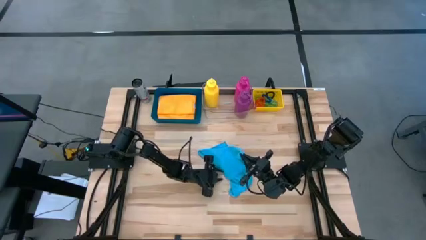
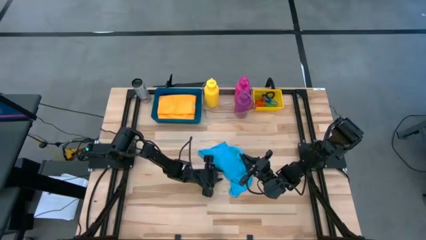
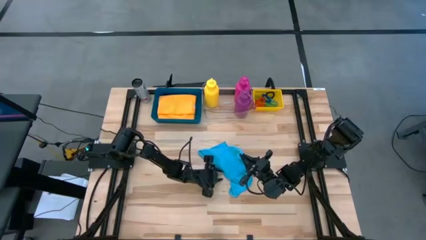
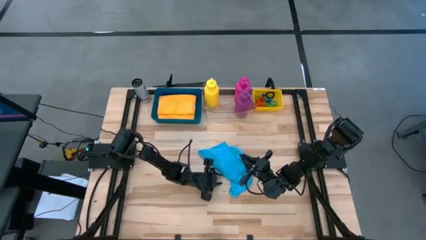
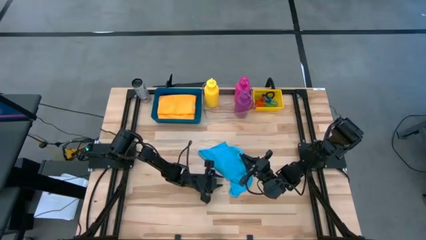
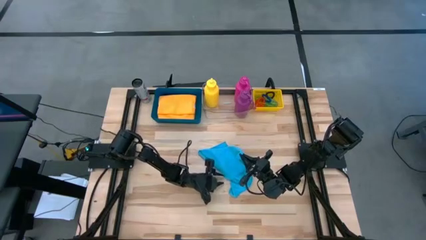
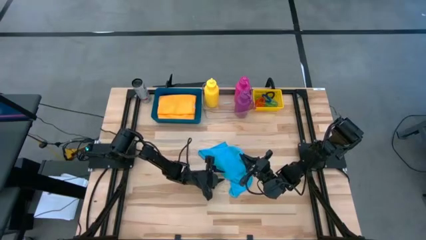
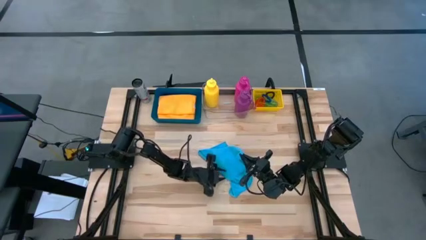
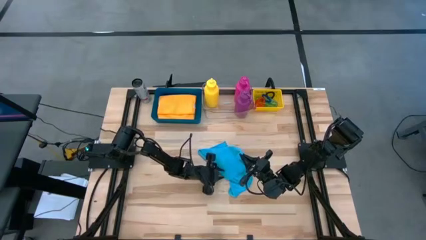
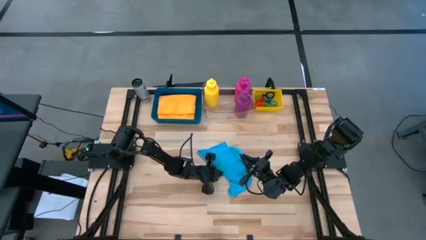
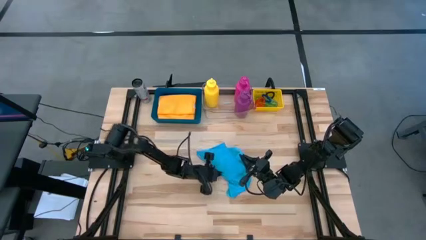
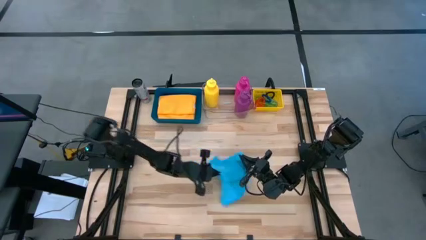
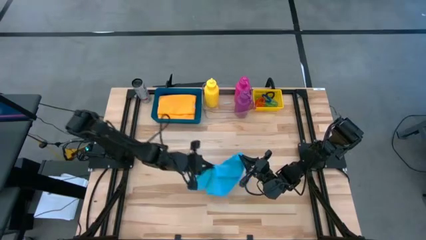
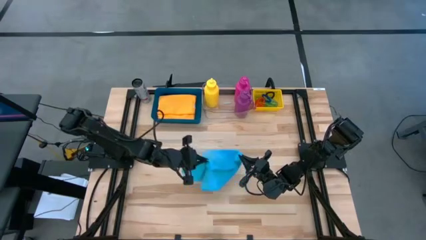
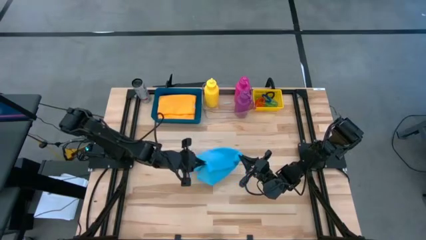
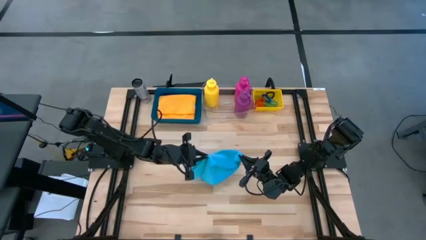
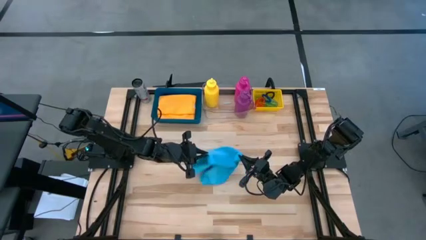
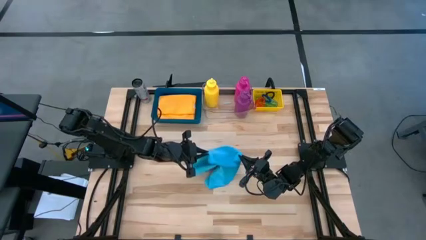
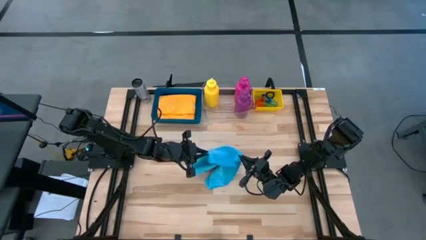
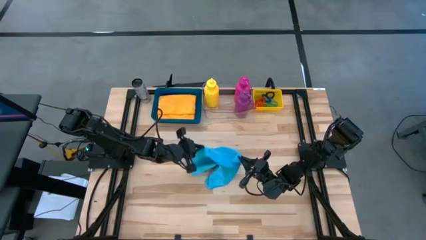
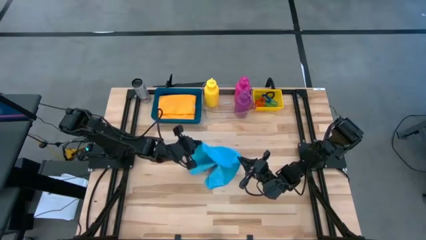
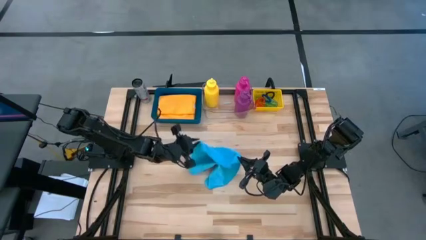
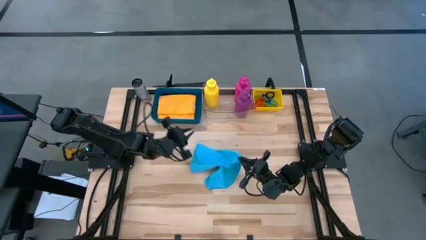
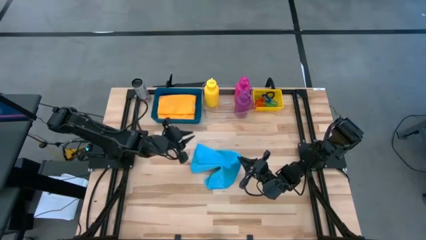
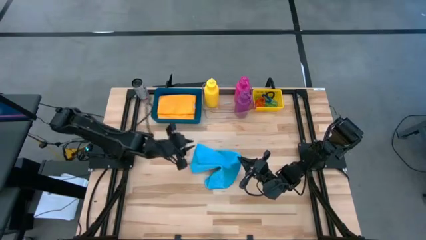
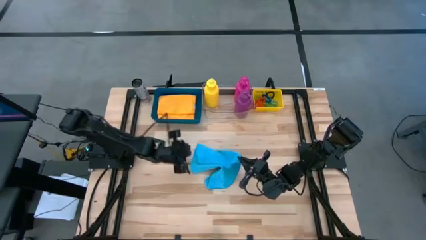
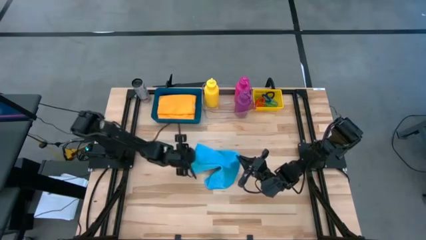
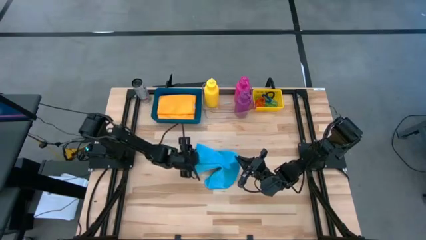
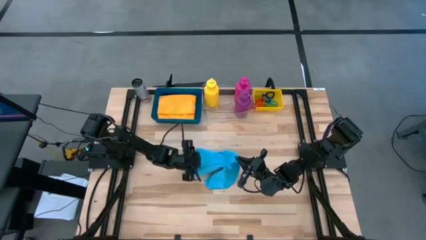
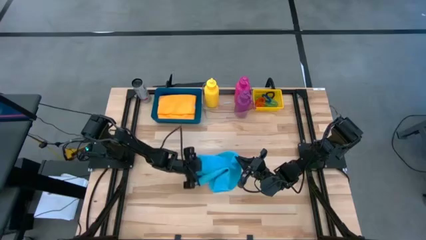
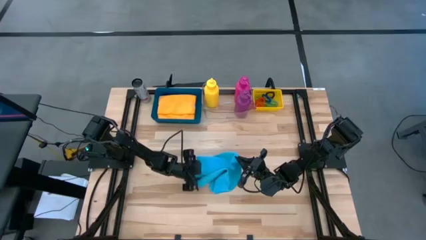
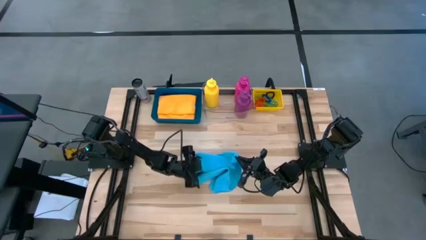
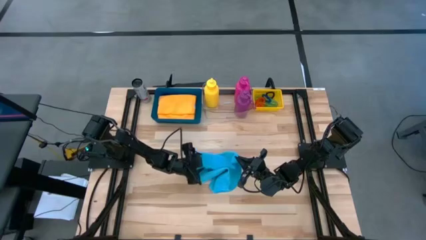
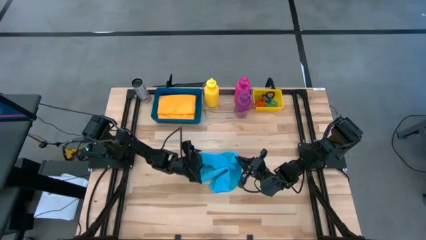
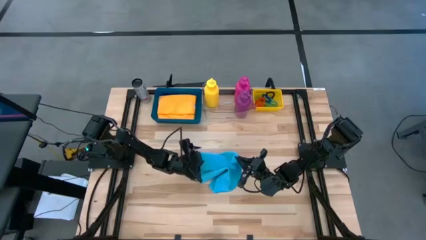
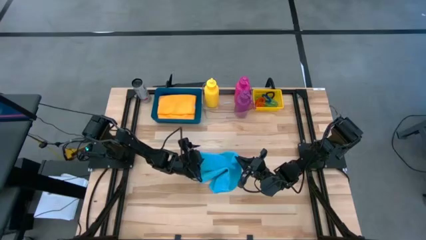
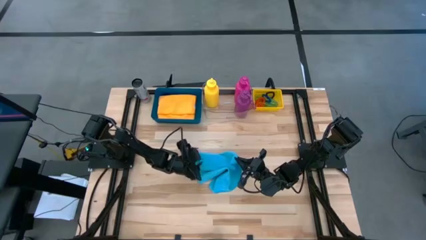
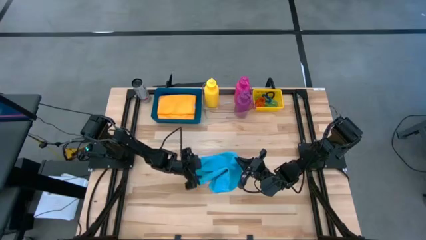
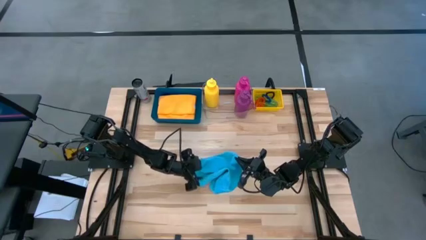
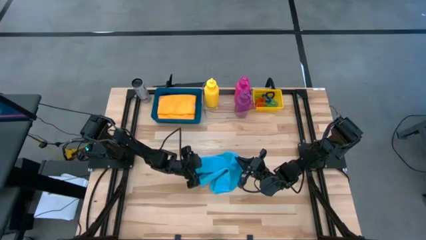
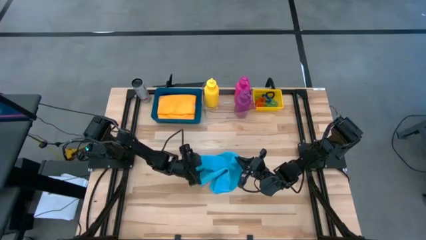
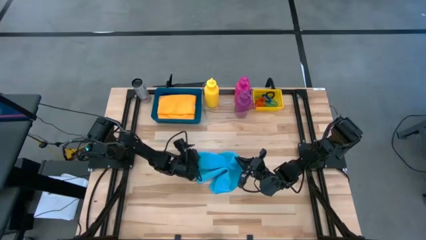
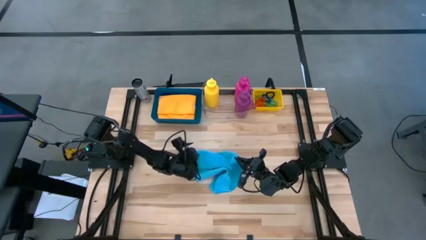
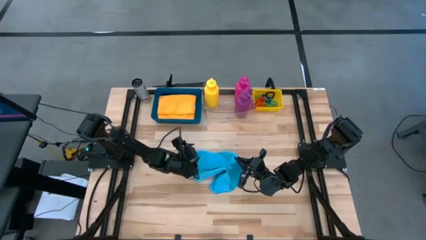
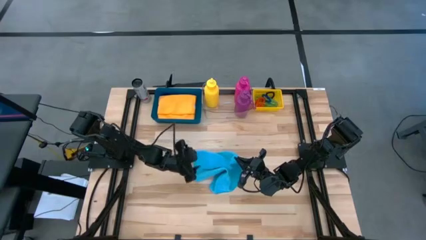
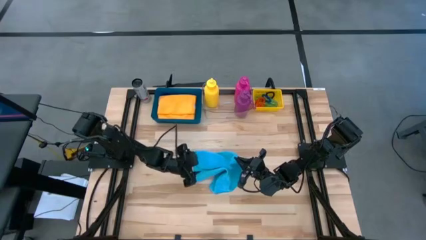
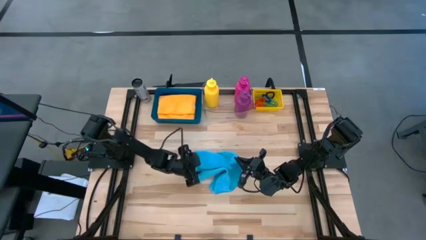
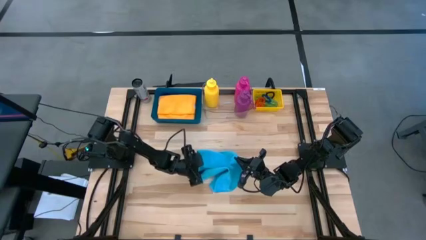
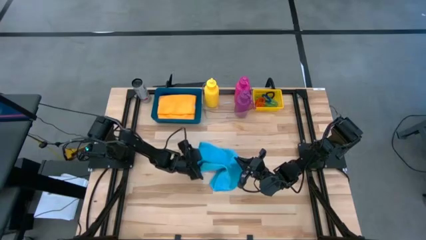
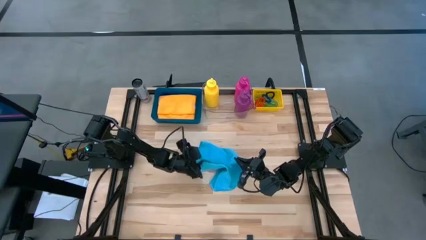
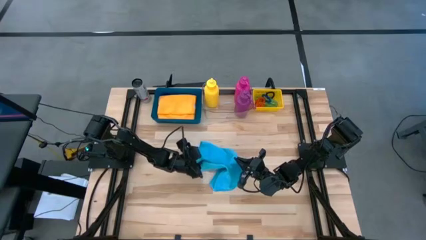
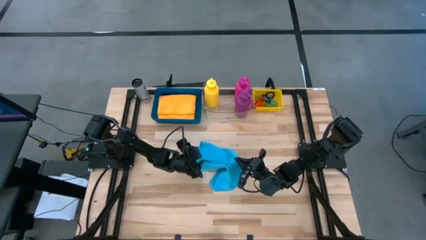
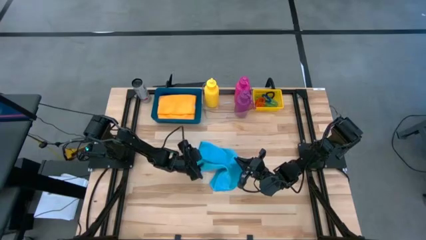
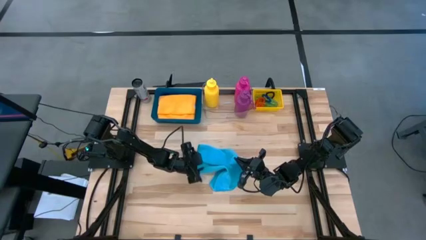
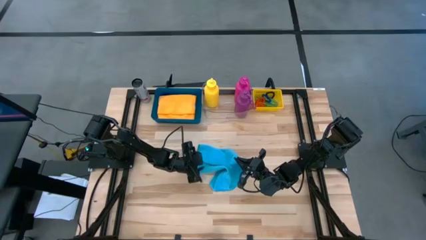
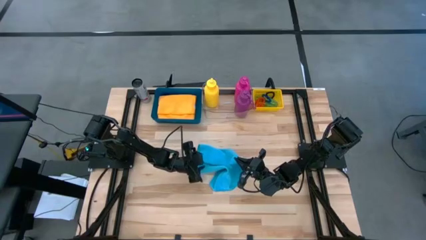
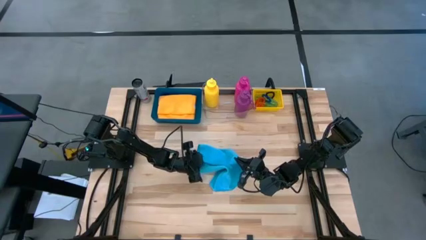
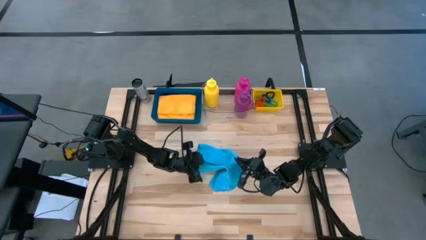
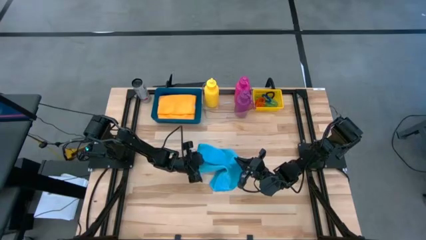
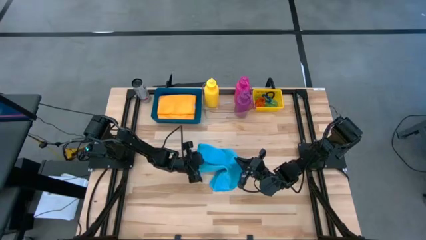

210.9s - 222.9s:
Task: Pick & Place Sports Items
Fold the blue towel
